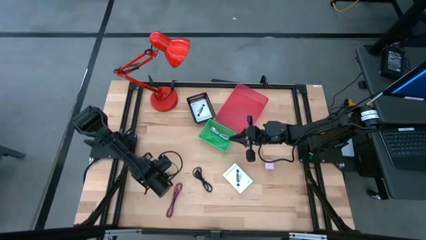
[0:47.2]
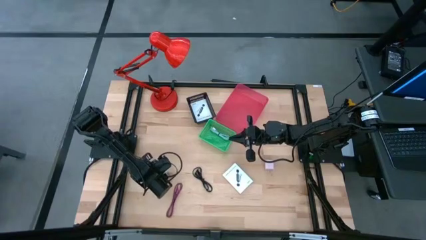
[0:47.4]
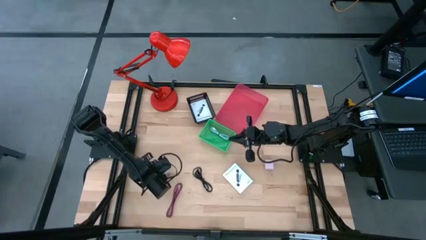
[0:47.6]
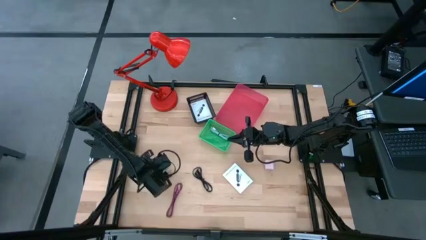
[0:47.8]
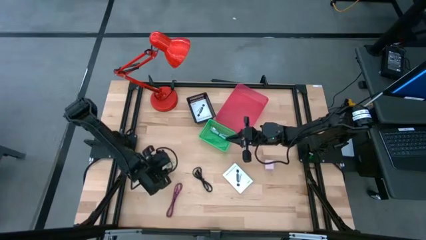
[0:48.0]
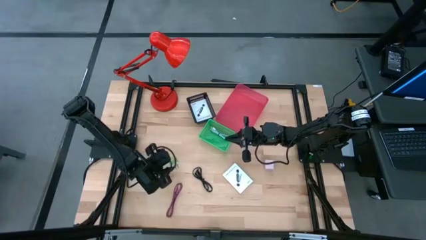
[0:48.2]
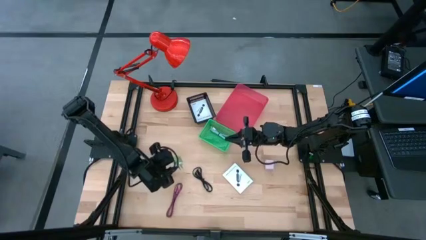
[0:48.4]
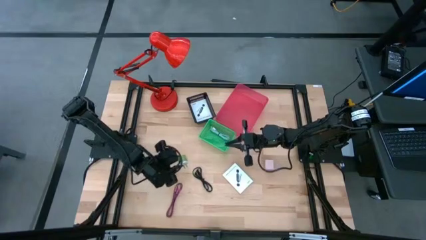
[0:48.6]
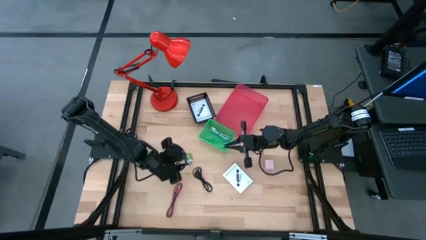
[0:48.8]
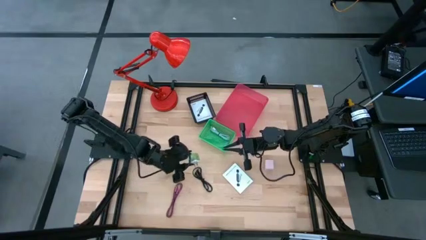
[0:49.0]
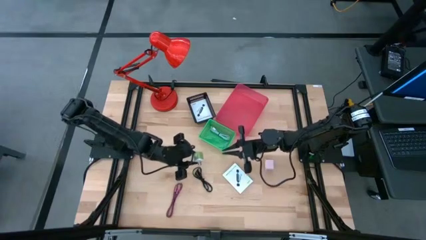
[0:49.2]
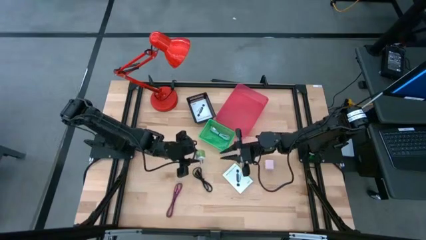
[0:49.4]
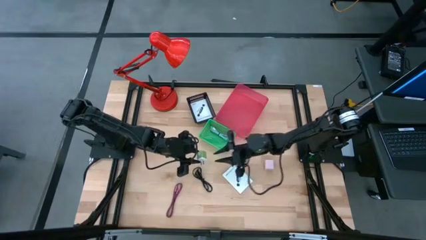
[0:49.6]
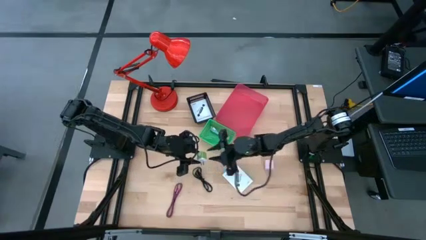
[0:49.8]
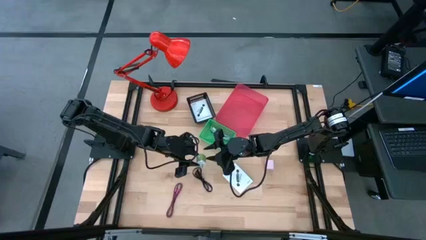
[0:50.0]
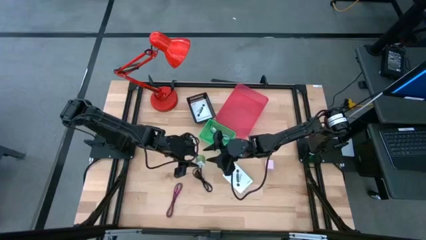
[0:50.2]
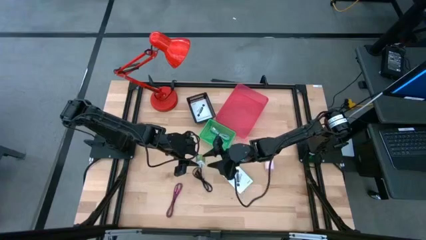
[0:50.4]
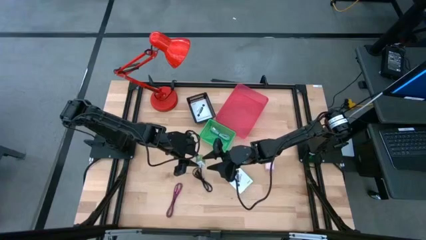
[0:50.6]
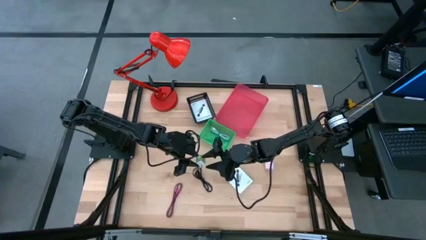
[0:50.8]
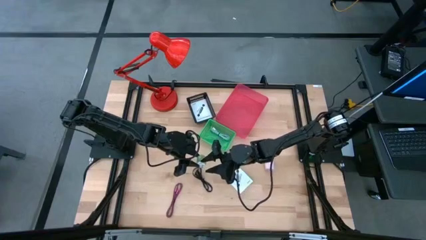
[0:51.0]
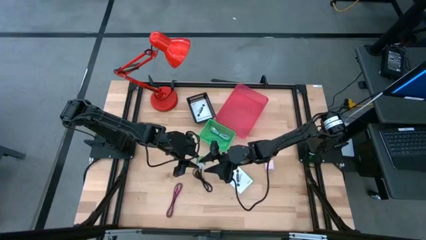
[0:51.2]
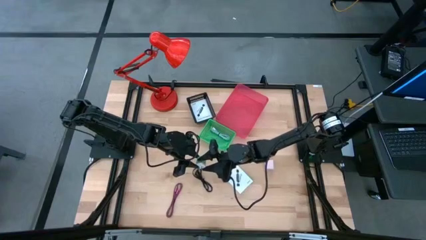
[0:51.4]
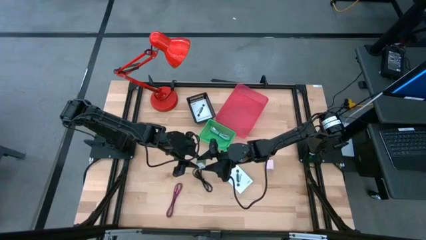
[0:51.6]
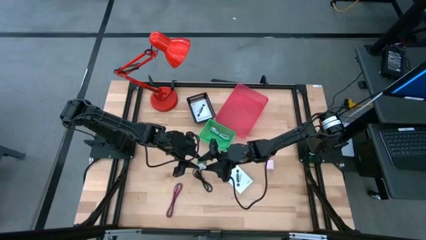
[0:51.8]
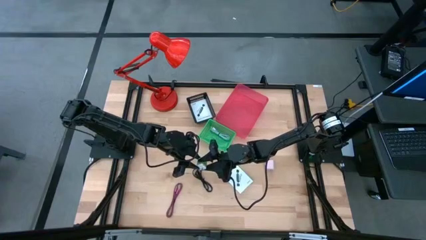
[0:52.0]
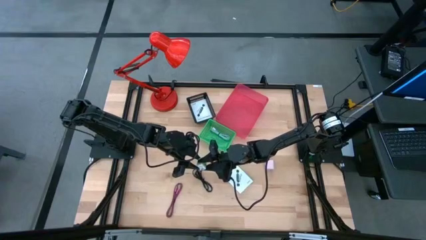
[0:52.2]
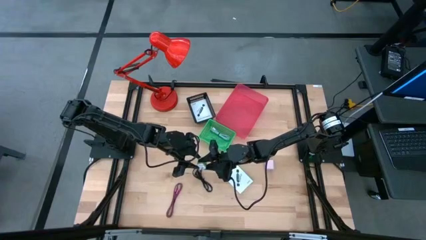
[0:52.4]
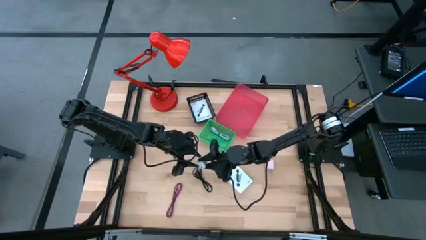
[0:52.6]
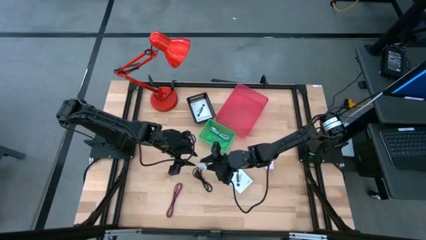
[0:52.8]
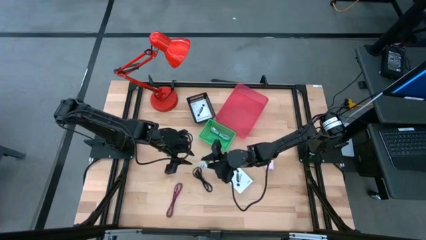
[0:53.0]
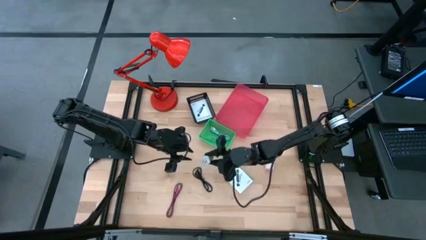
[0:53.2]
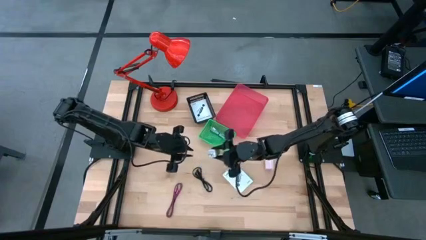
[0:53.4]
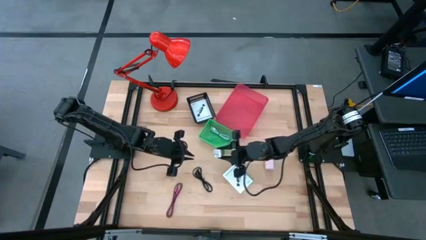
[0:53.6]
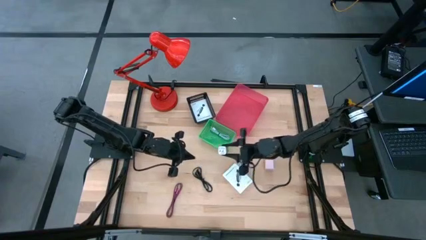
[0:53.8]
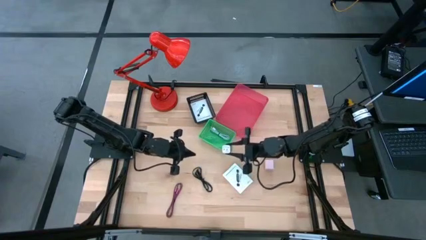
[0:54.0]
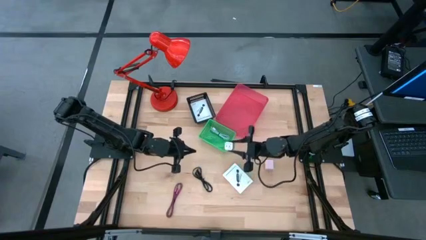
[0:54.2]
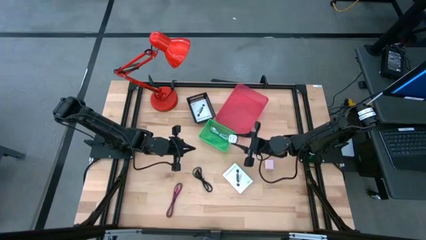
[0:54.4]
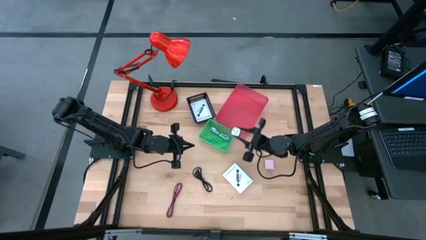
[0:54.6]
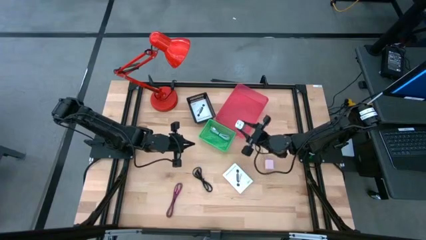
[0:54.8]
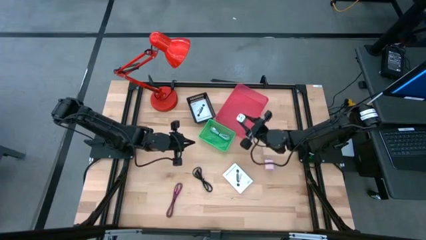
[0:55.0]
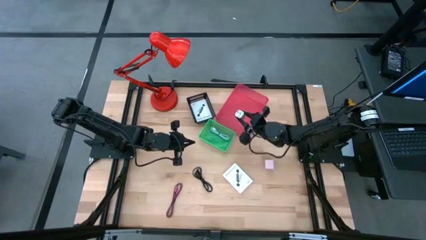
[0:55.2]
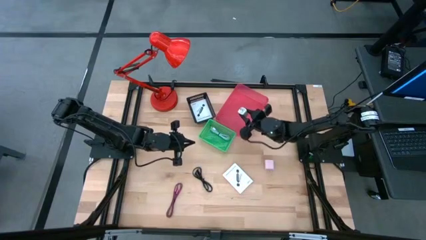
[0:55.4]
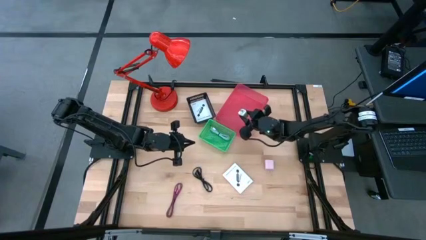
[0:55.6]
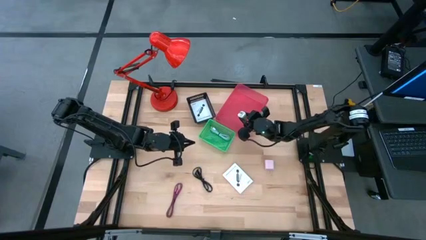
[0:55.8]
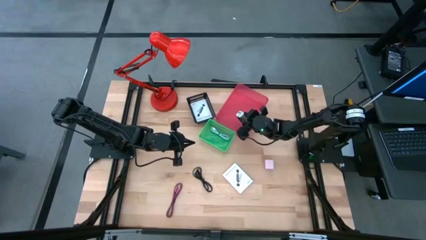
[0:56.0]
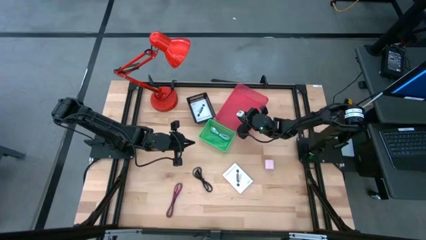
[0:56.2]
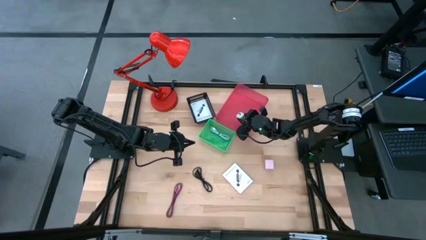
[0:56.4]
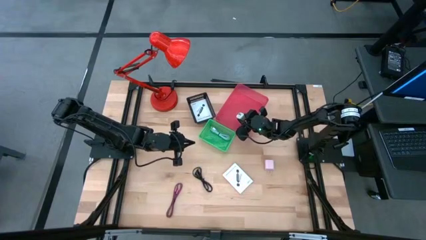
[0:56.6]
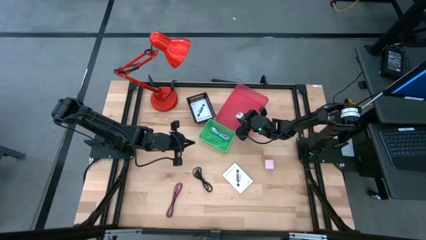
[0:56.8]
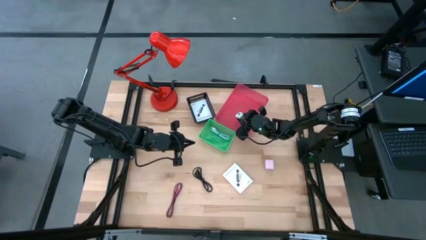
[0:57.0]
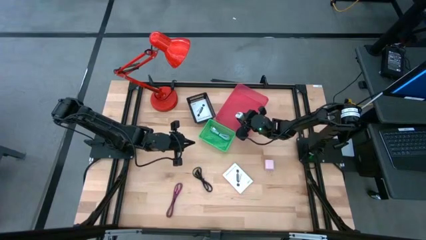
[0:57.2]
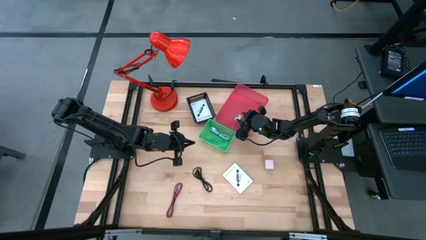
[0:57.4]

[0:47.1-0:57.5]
Task: Pick and place items into bin
Put the green charger adapter into the red bin

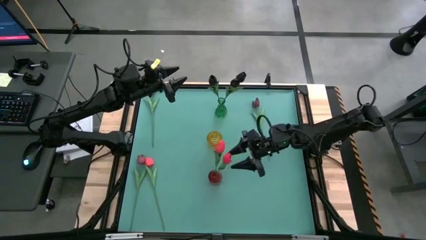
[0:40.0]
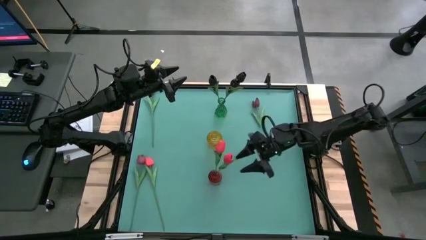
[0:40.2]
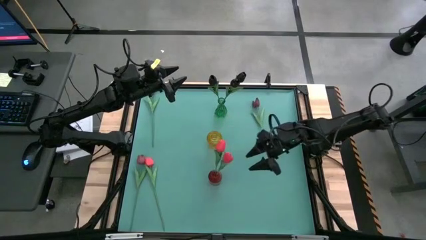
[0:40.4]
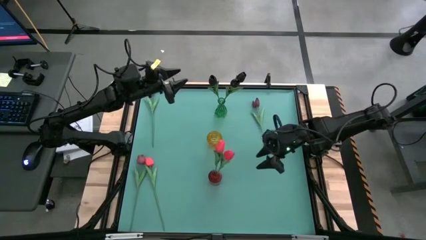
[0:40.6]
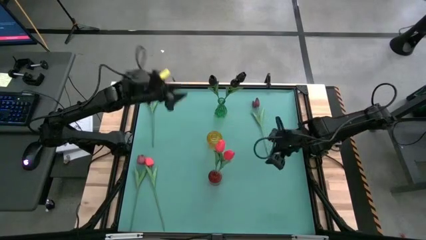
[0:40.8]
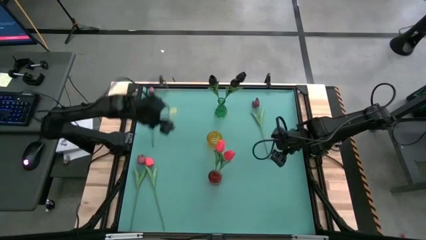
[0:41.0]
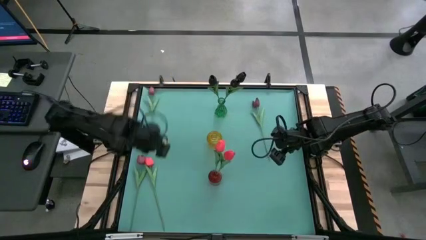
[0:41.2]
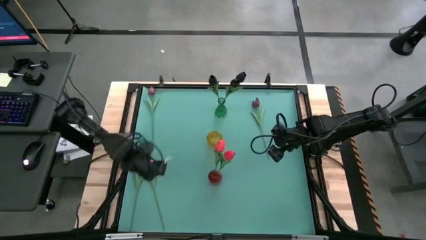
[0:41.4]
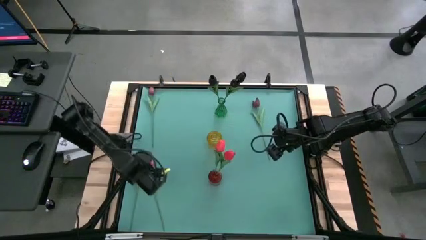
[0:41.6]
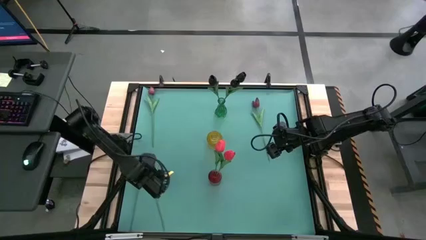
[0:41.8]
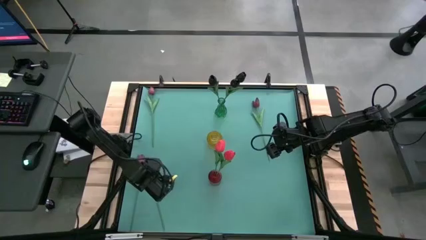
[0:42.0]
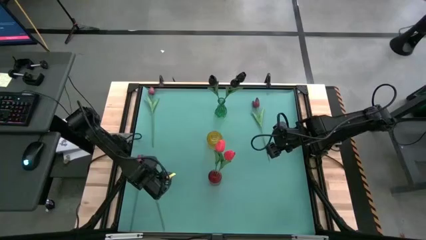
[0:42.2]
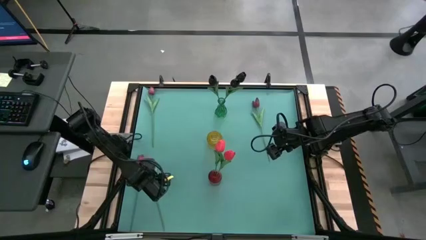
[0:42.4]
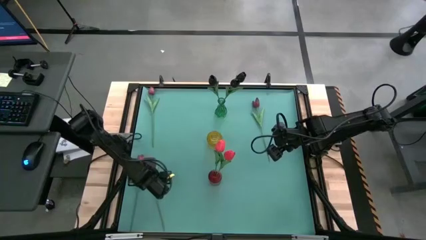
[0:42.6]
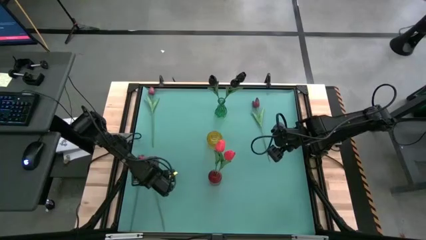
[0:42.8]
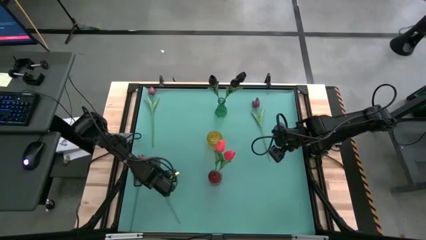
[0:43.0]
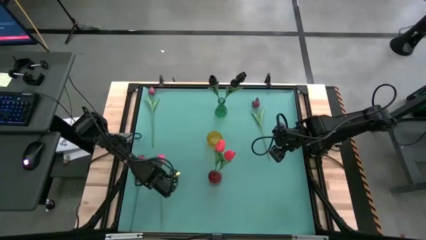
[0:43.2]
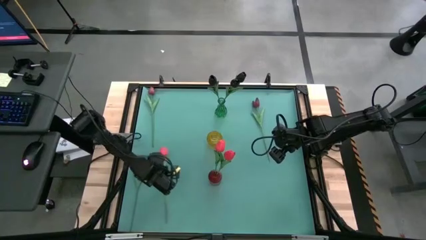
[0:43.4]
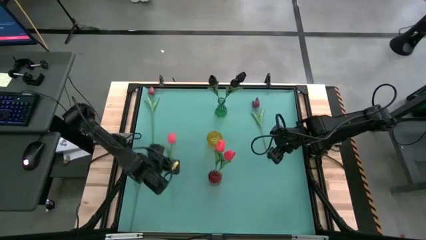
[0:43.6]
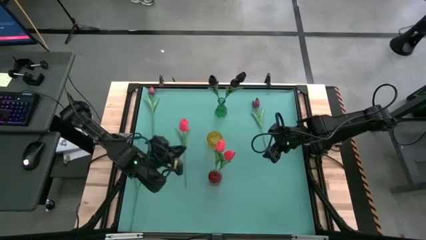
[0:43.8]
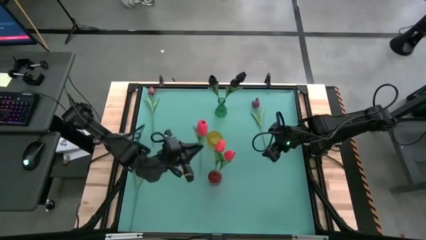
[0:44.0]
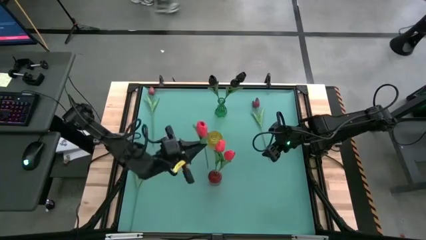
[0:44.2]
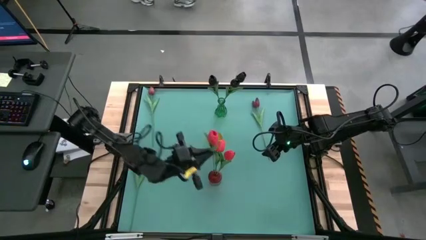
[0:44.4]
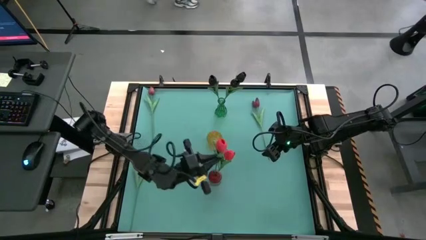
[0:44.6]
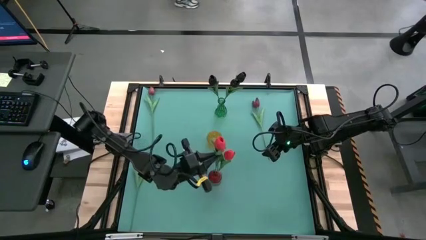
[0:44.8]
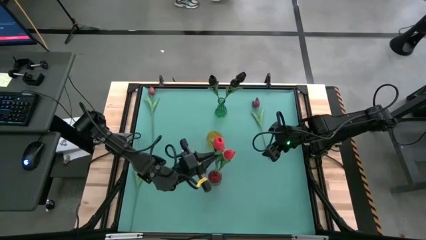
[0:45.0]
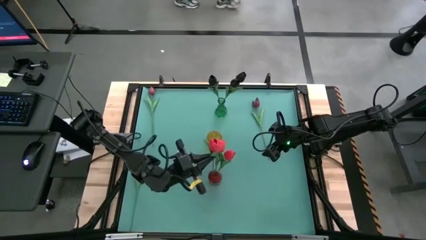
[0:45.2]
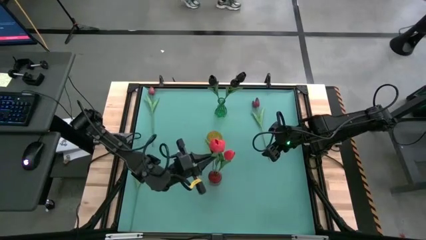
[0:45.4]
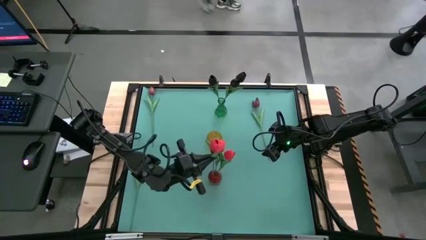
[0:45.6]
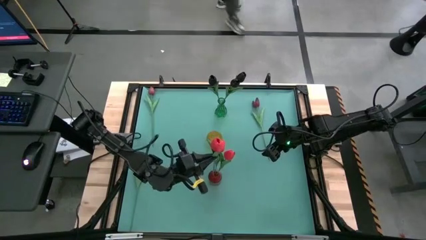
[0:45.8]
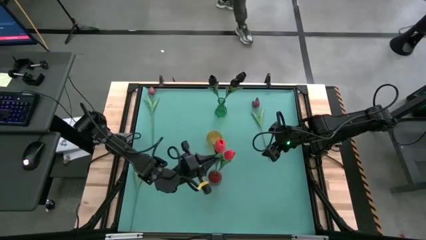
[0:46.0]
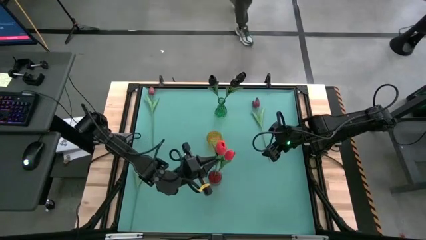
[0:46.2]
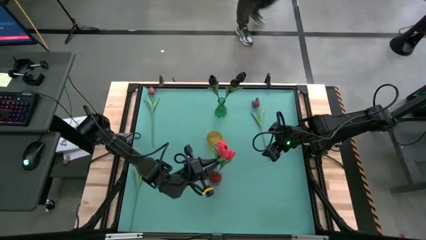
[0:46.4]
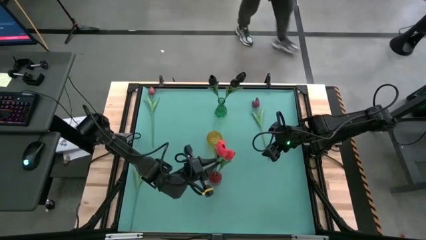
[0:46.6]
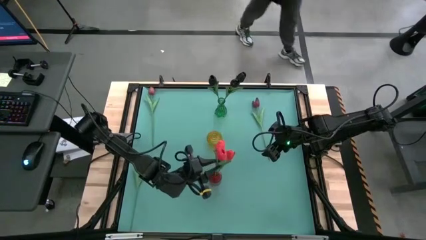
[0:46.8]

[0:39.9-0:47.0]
Task: Sort flowers into vase by color
Put the pink tulip into the red vase
